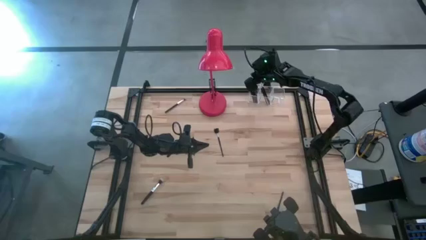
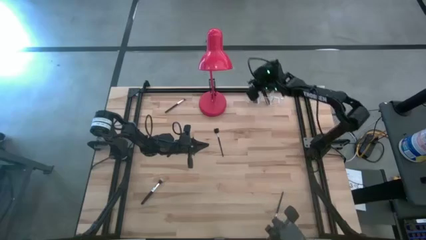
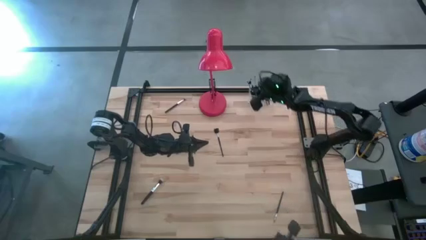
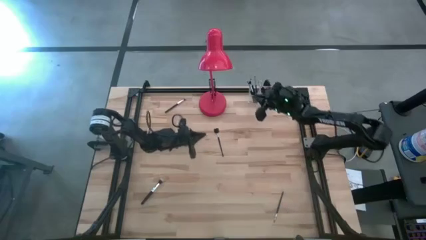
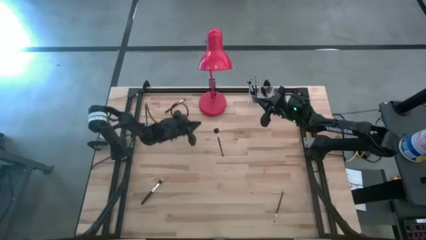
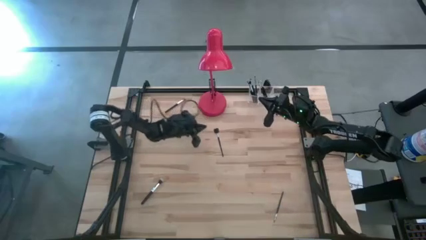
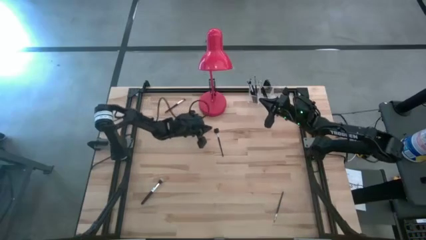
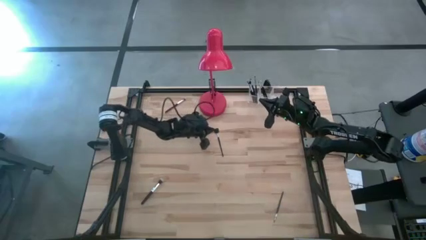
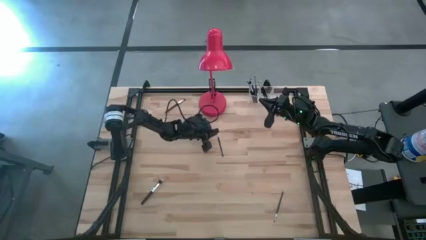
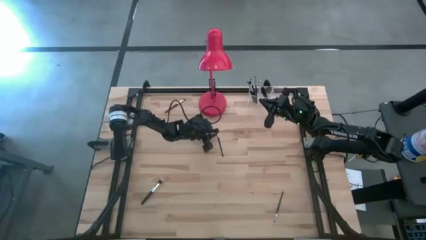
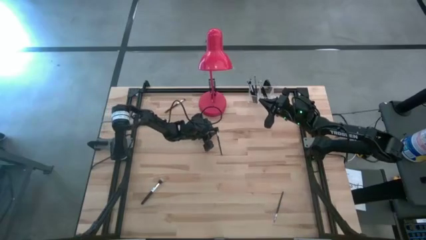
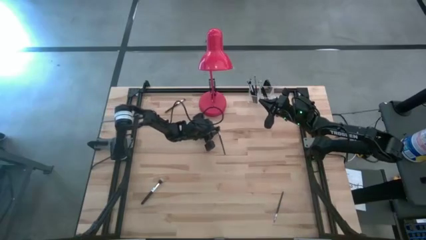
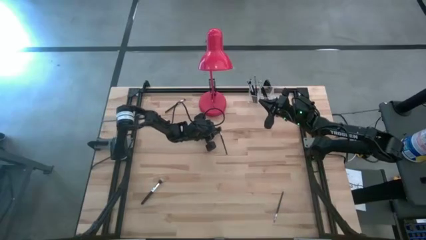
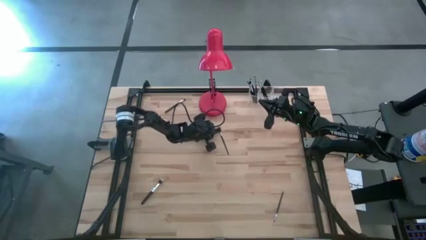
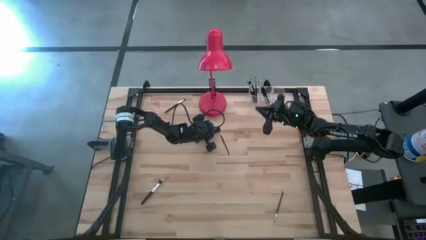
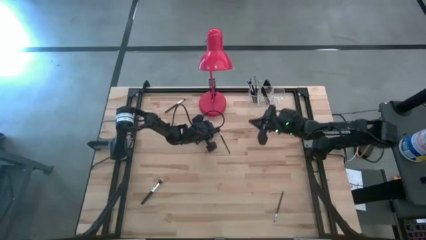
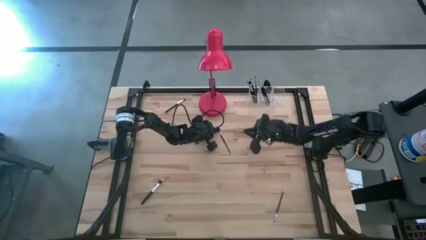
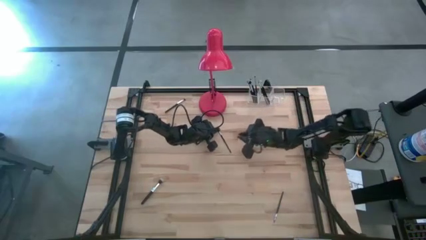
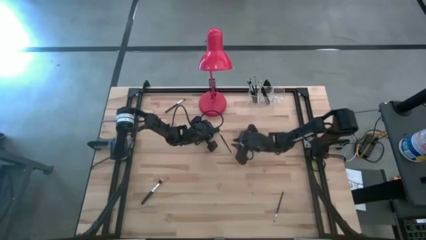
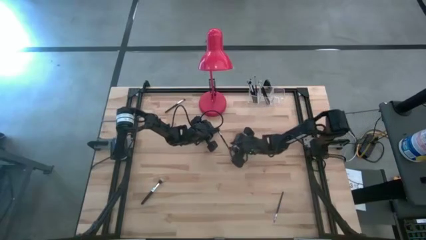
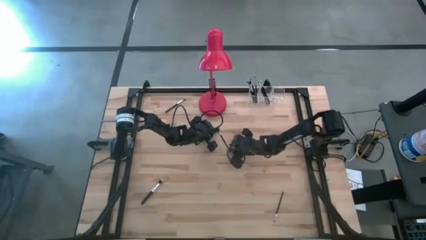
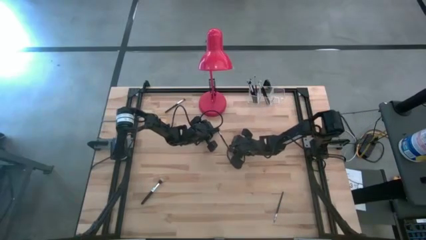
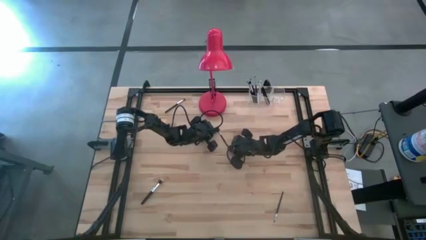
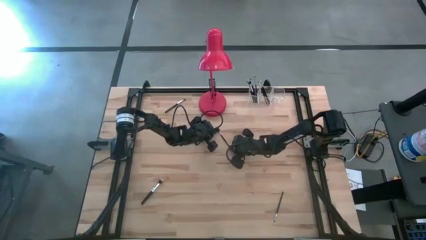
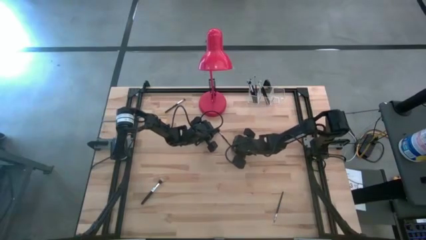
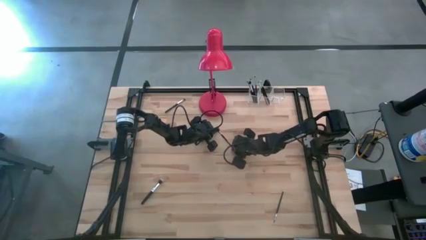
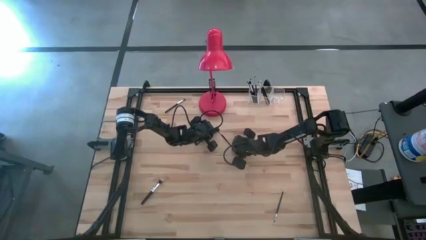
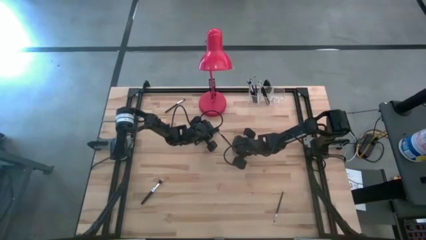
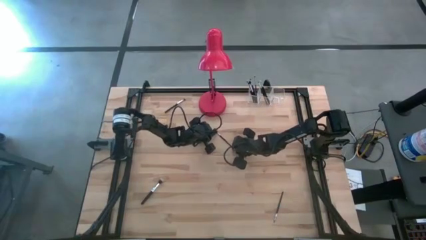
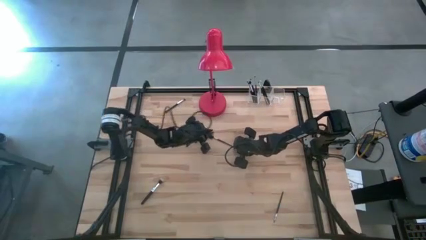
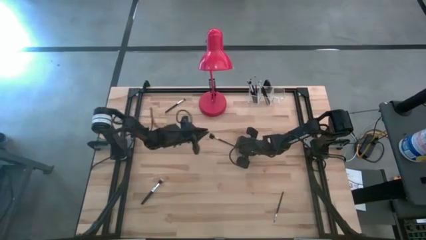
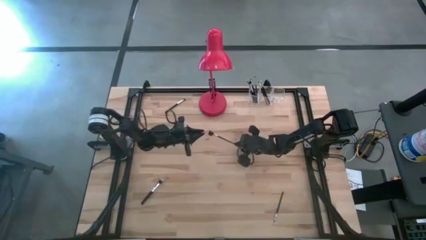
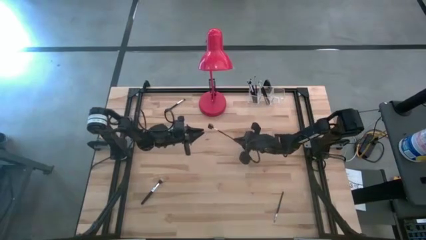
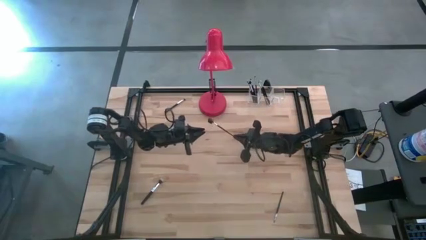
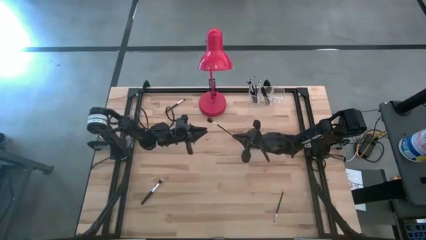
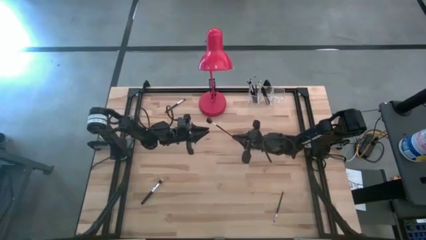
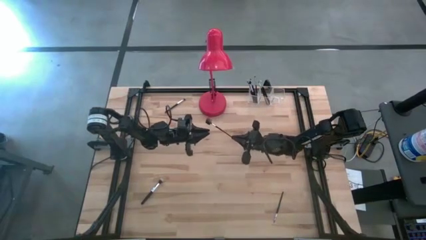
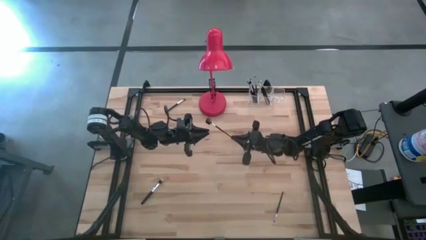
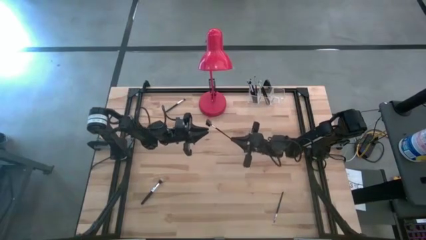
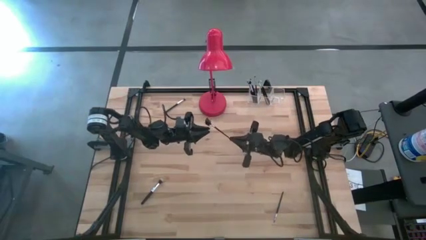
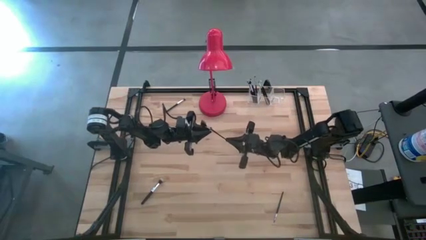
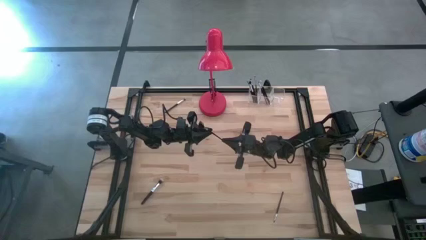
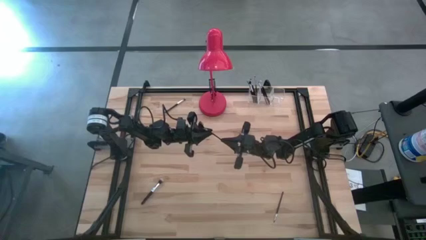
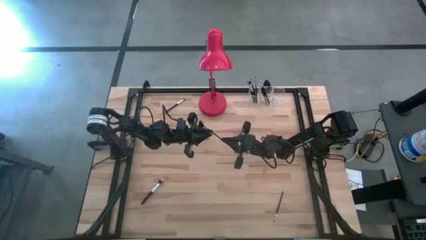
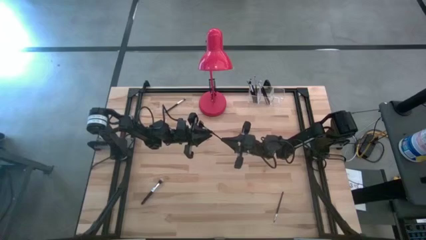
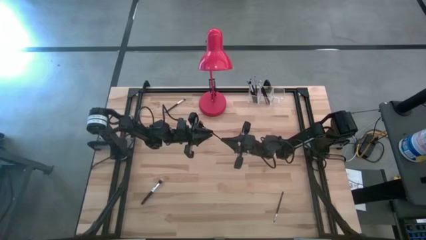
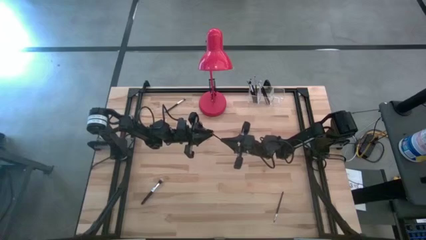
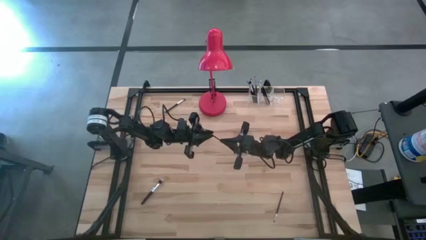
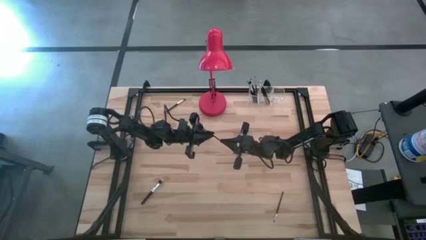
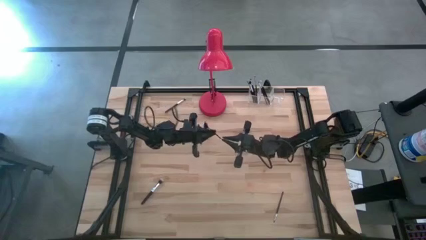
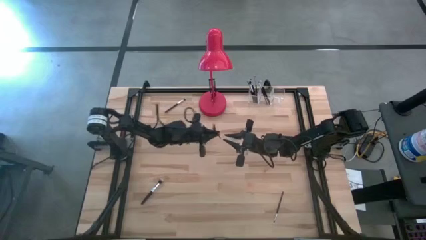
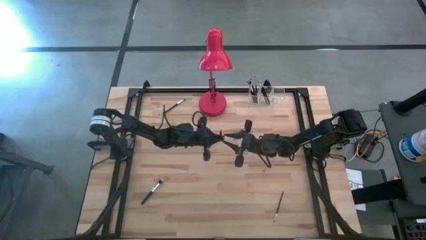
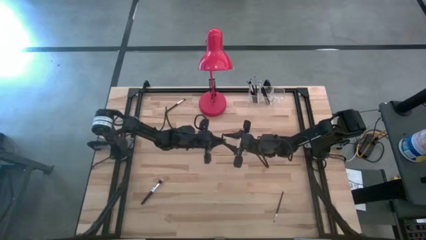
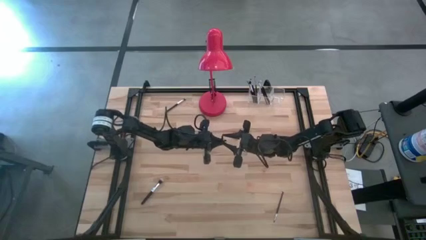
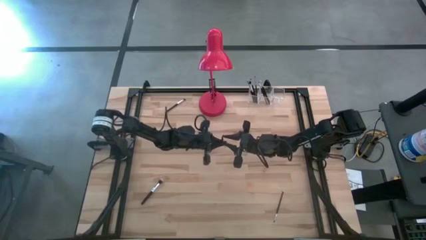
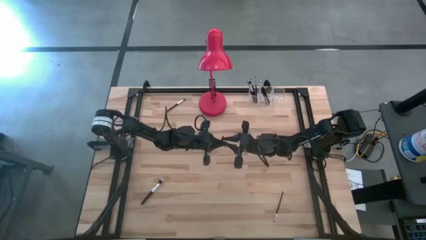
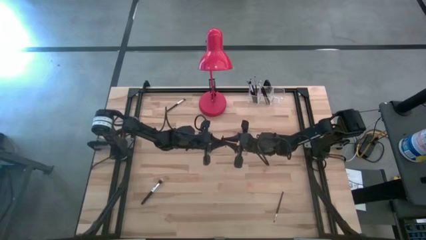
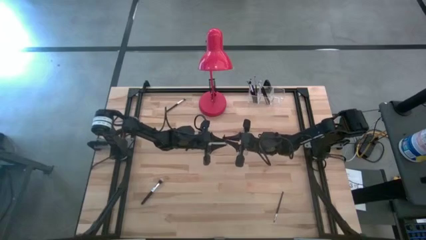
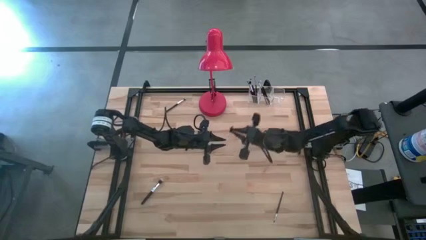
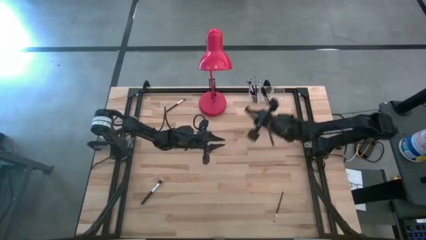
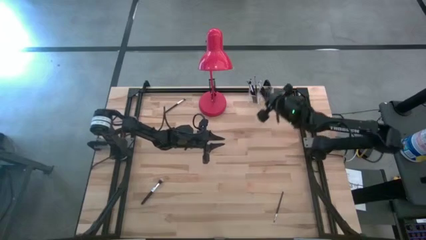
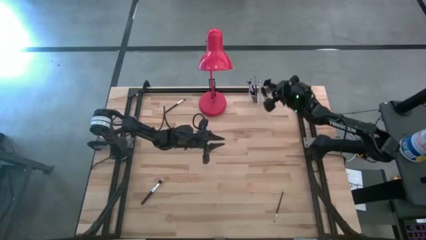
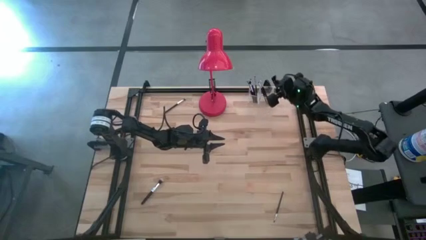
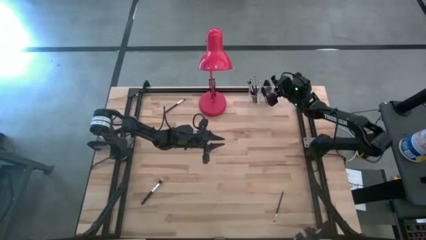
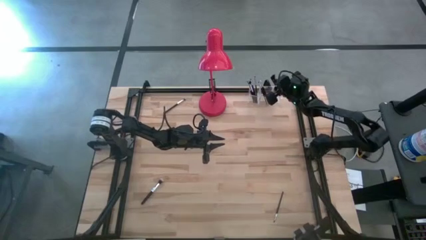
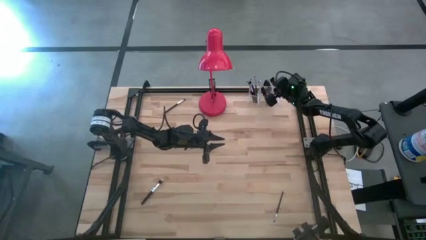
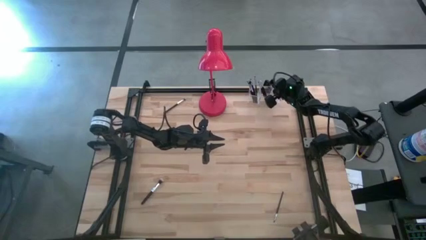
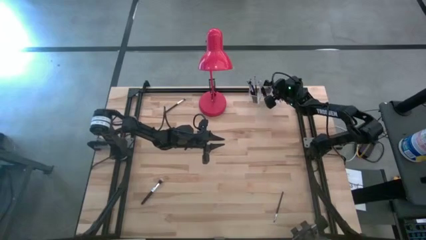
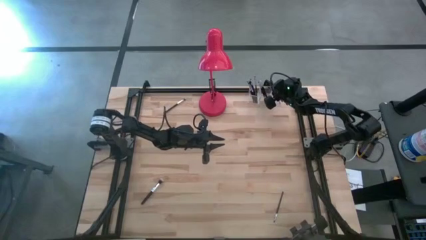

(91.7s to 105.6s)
Task: Sort items
Put the black brow brush into the transparent organizer
